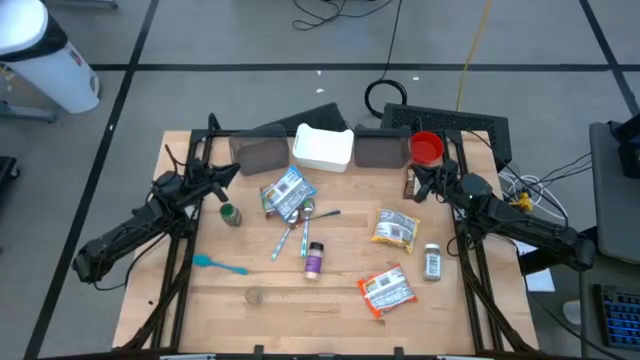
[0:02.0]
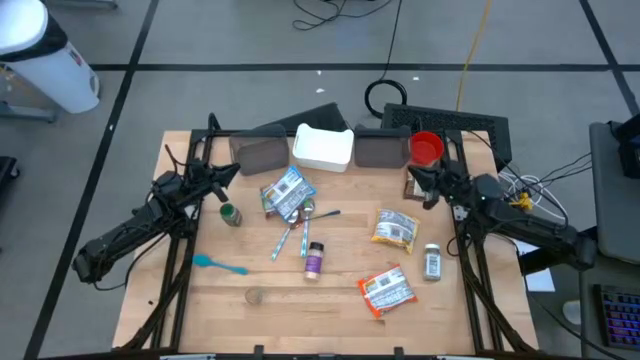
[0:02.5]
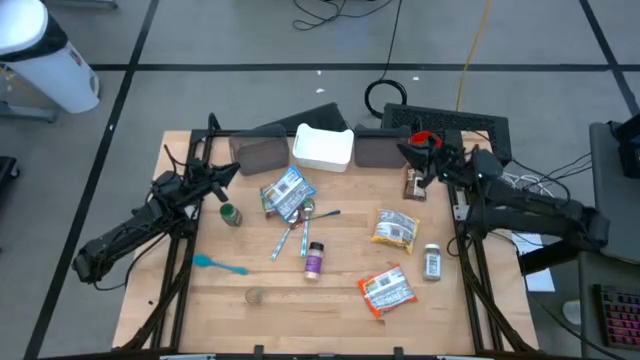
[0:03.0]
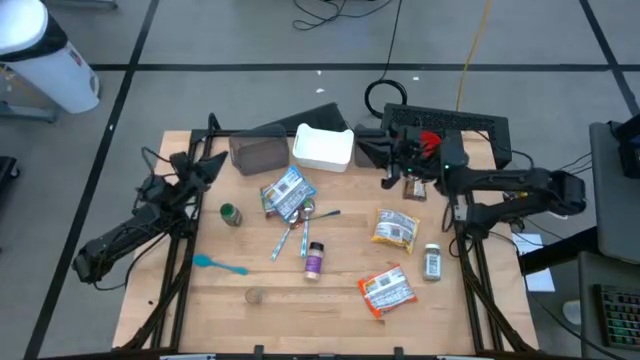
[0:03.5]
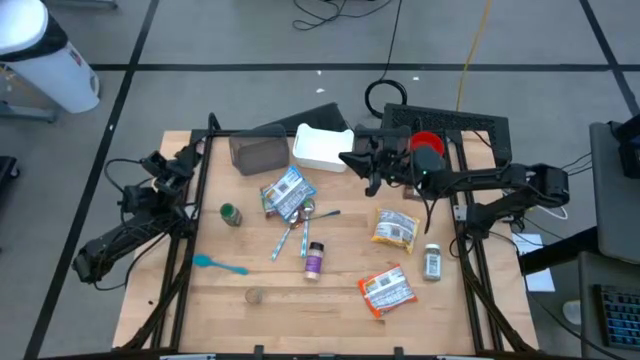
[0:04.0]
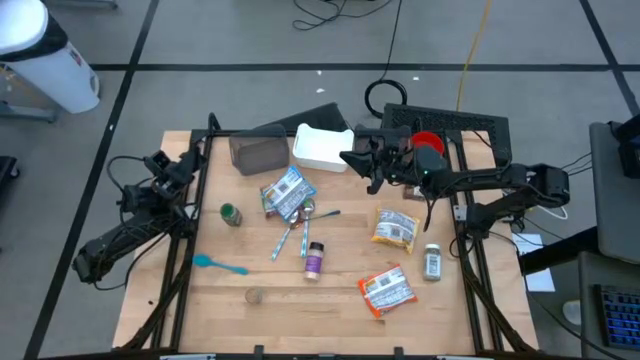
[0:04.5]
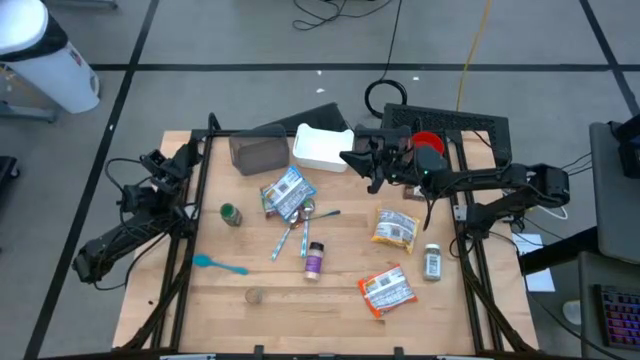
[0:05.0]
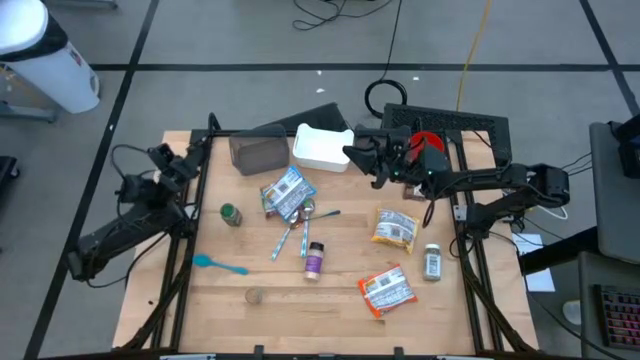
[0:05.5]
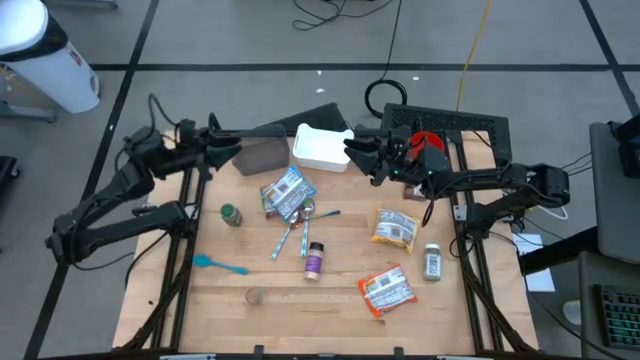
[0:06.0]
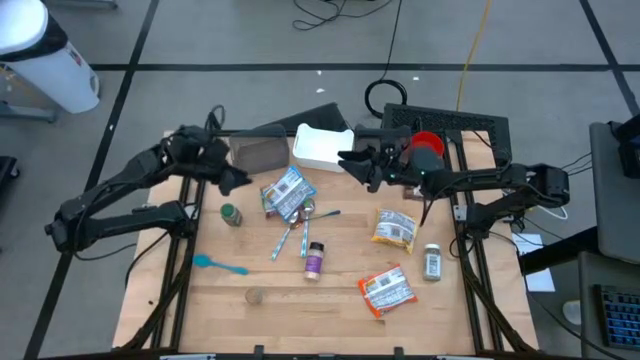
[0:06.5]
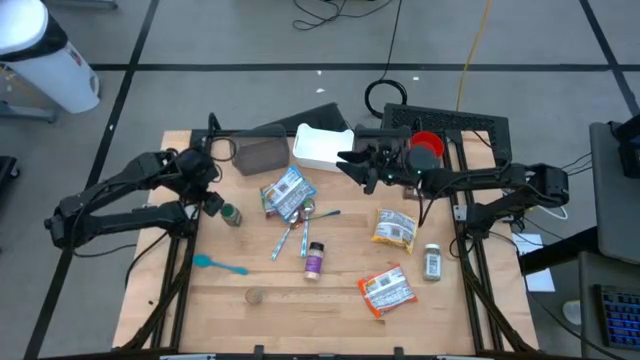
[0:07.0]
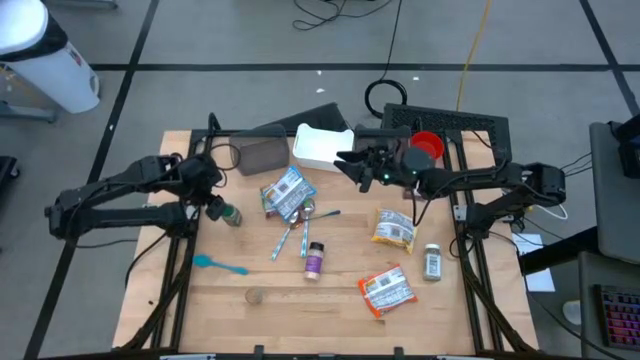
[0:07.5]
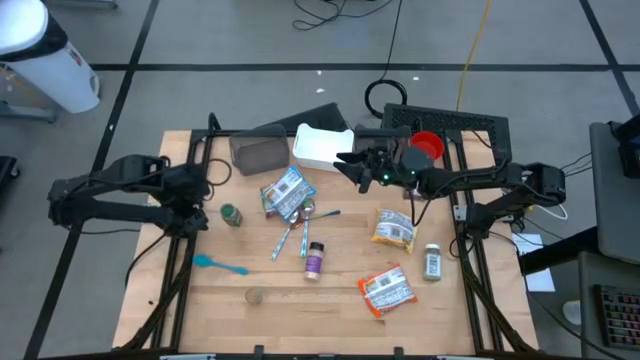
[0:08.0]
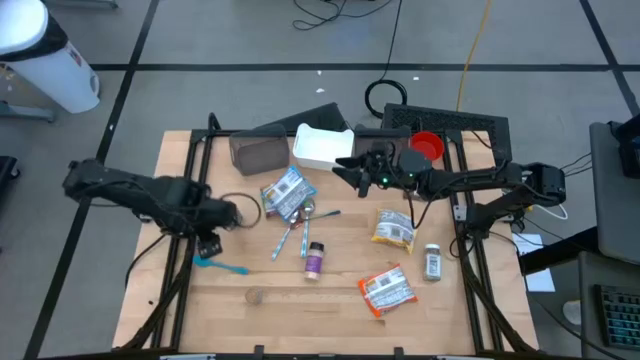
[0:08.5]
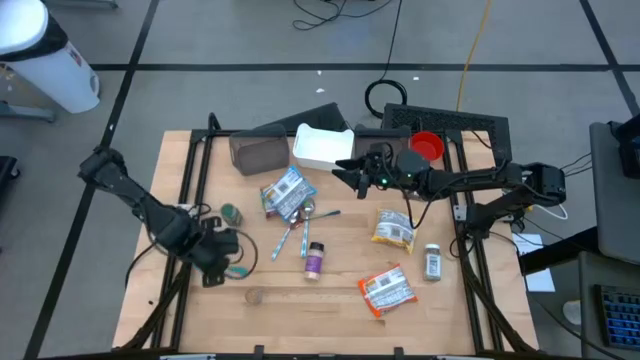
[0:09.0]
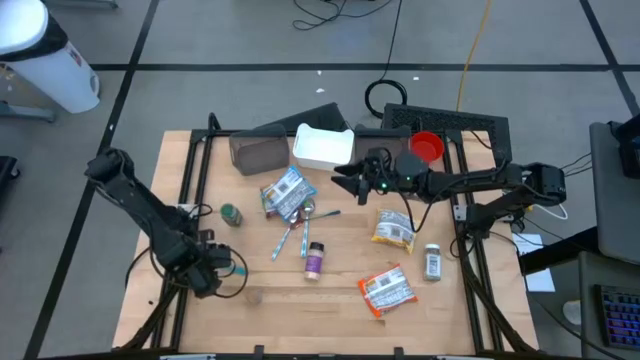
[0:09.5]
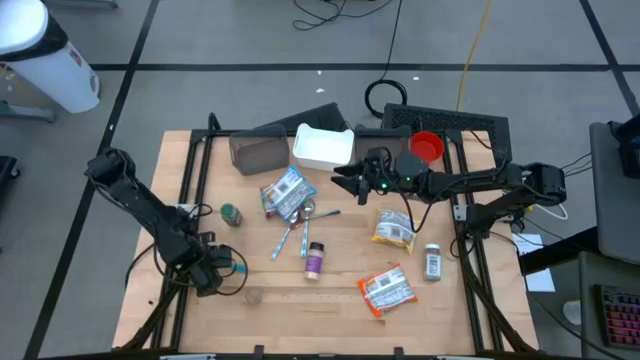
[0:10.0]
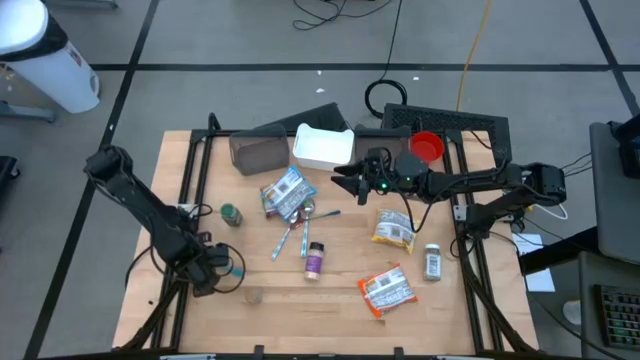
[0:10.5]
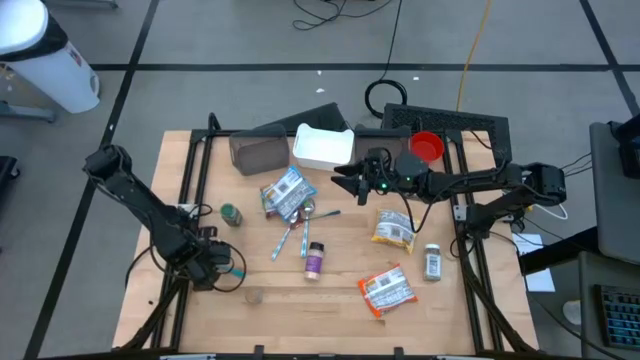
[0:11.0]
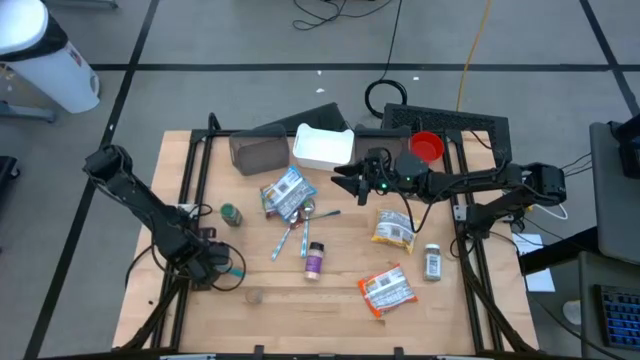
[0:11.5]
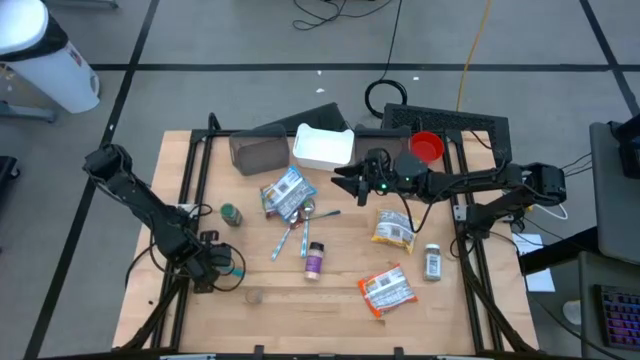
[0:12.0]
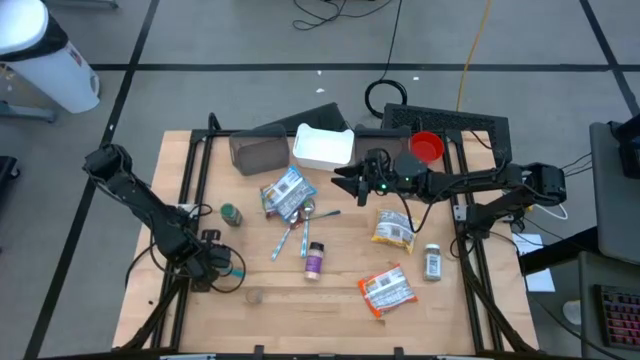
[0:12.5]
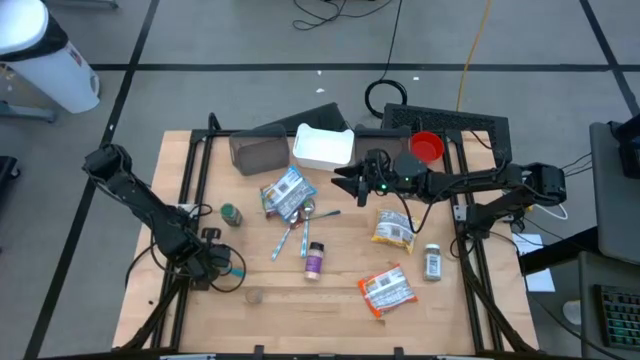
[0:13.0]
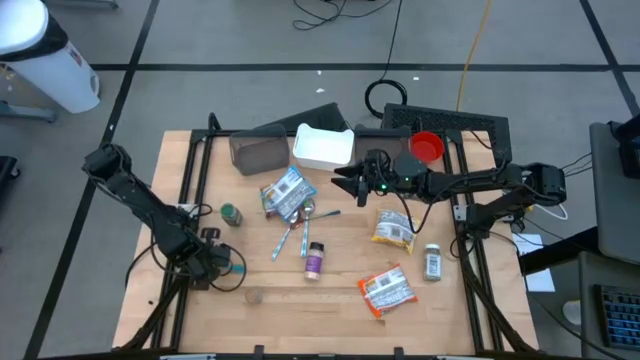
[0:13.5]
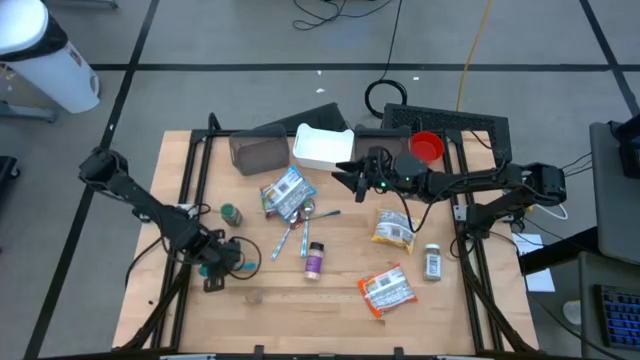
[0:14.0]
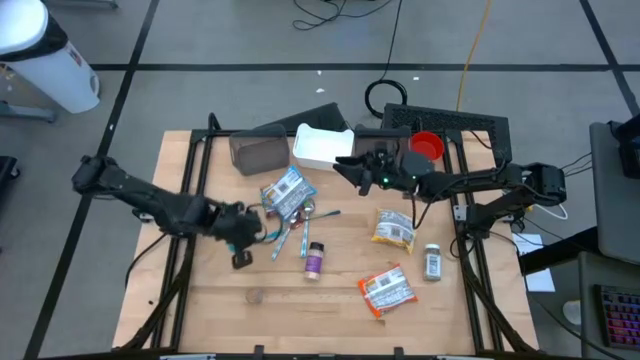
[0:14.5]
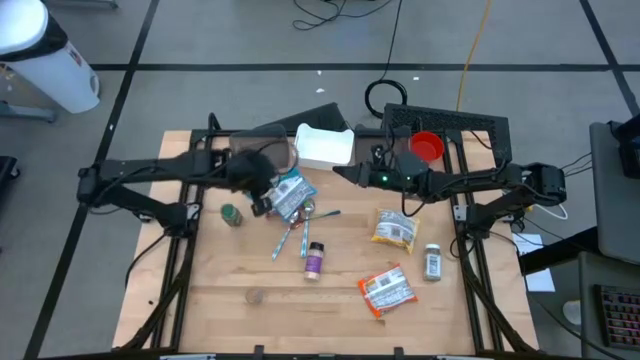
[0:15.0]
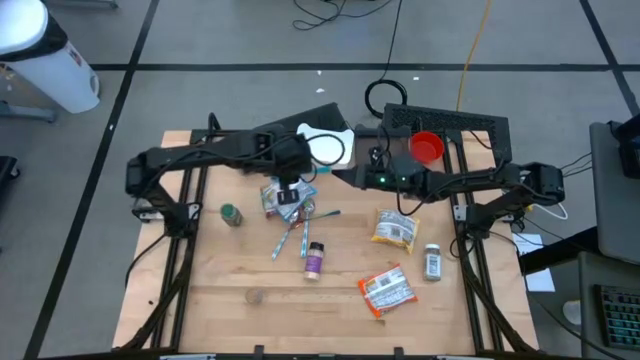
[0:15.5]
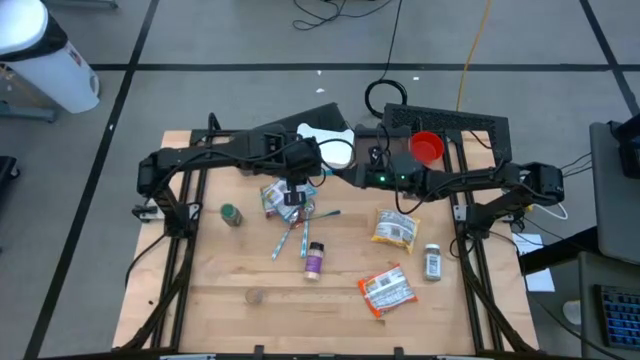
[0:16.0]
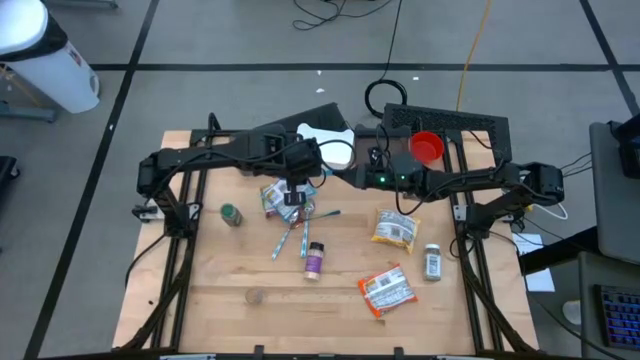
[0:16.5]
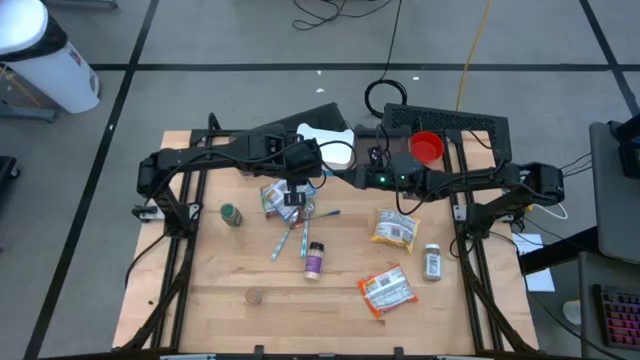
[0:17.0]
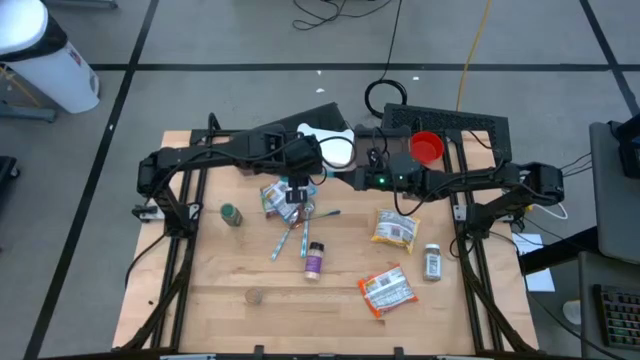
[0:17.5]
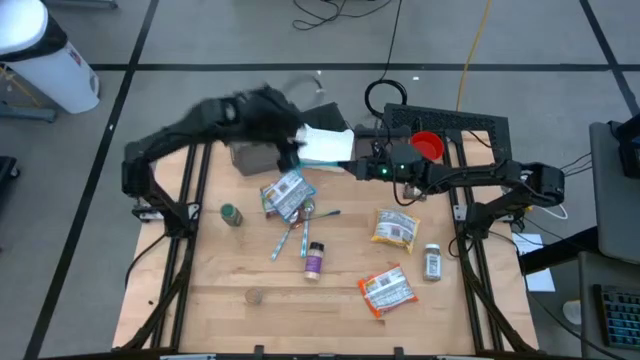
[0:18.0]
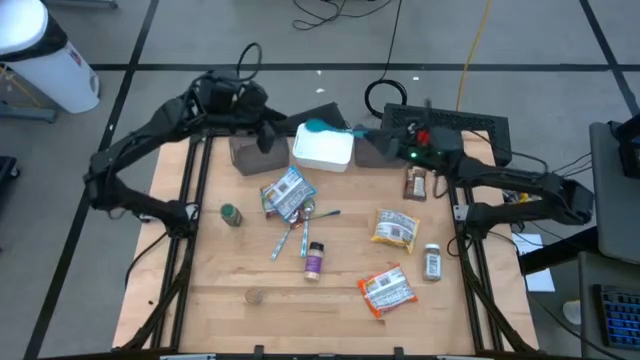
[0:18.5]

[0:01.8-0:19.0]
Task: Pick & Place Food Item
Put the blue baby spoon into the left black bin

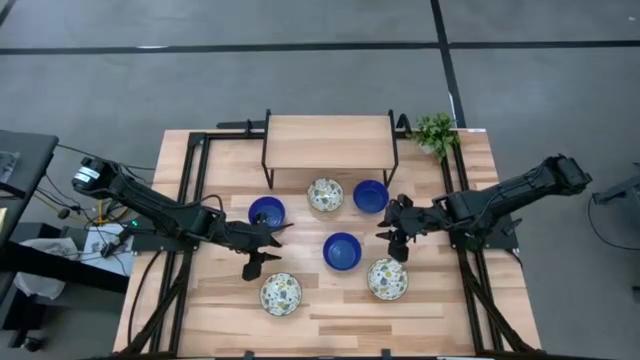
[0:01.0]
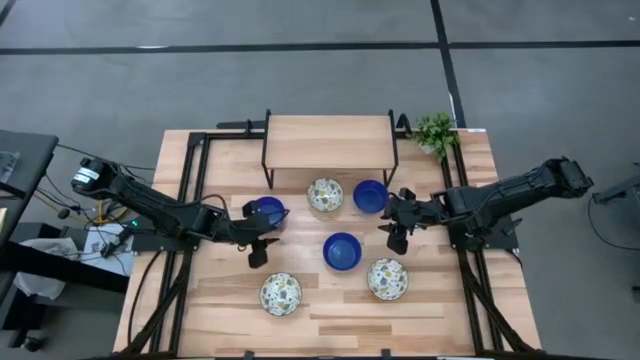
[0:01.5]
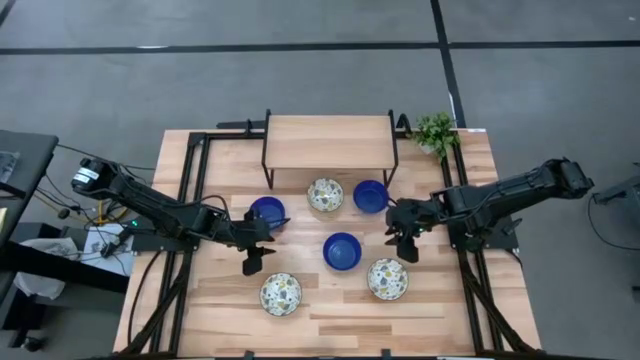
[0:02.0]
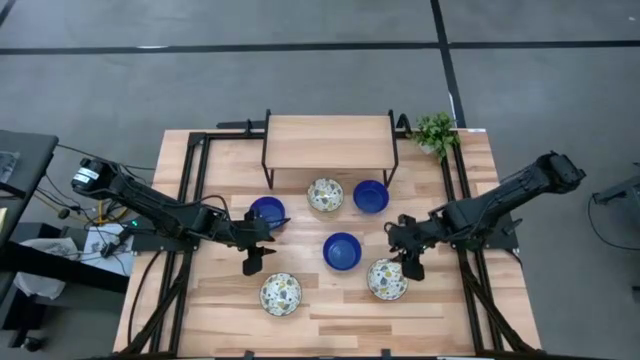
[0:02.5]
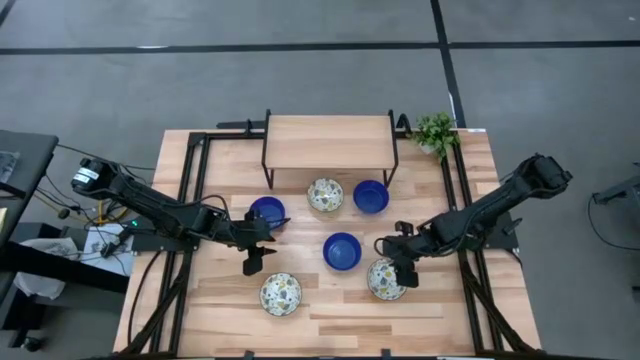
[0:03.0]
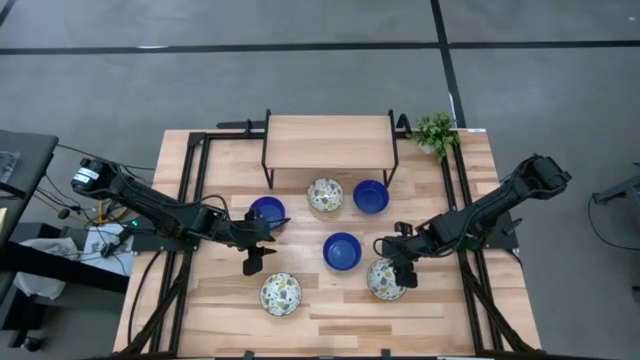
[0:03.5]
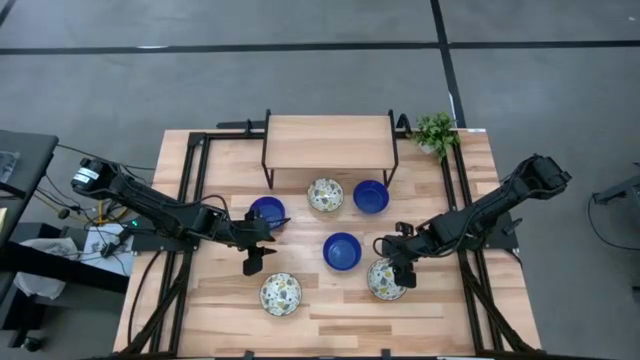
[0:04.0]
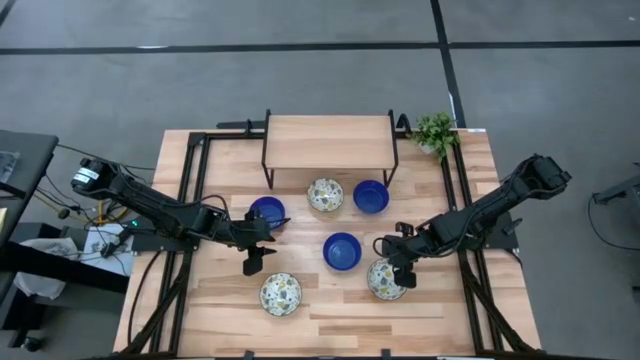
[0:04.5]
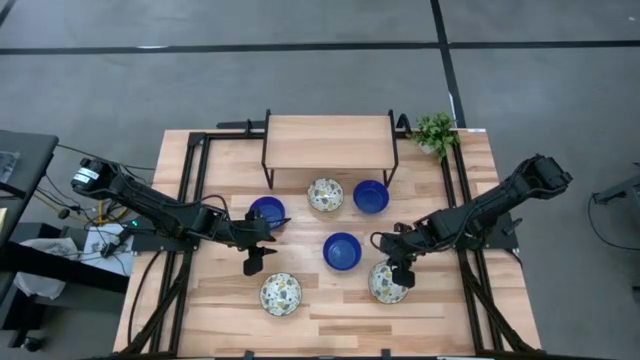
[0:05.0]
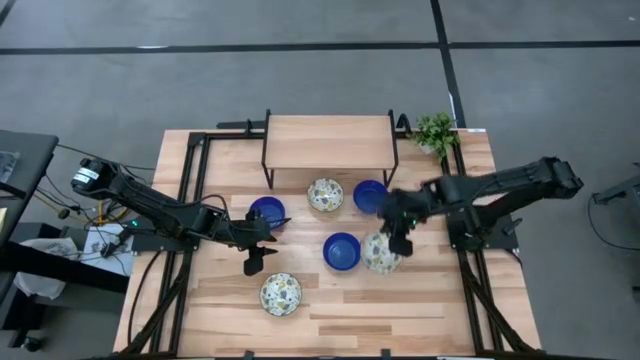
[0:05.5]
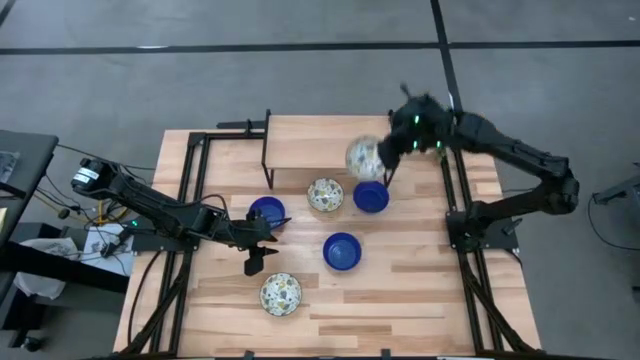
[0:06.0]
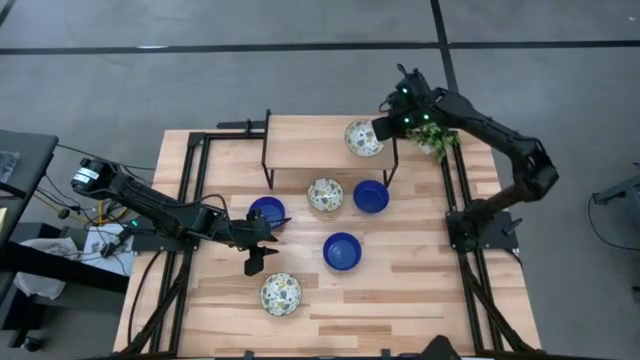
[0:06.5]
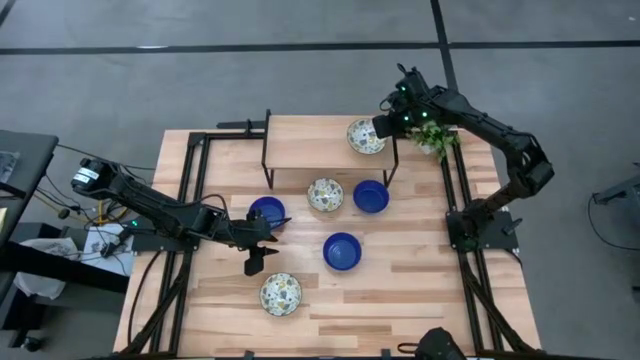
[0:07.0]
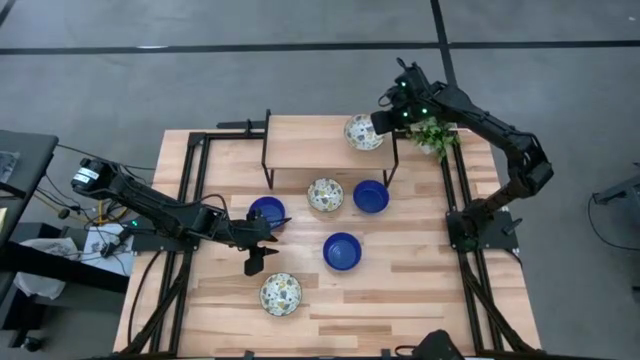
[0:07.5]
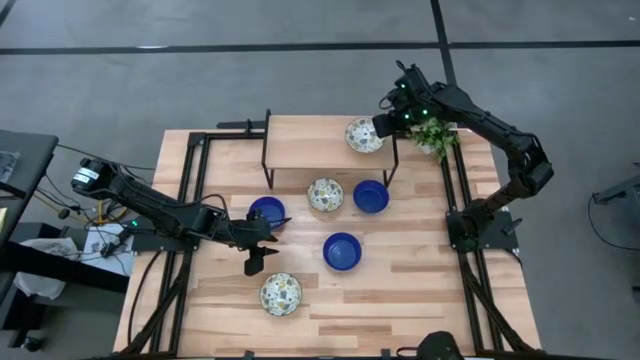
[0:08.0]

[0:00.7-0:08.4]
Task: Pick & Place Mini bowls
Put the bottom right yellow patterned bowl on the shelf
